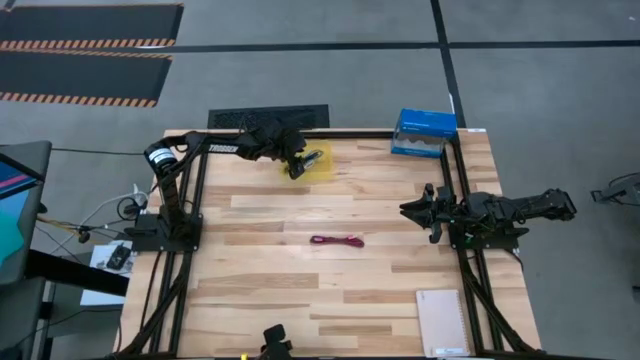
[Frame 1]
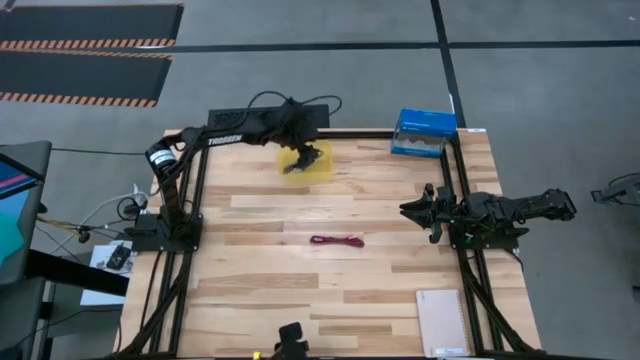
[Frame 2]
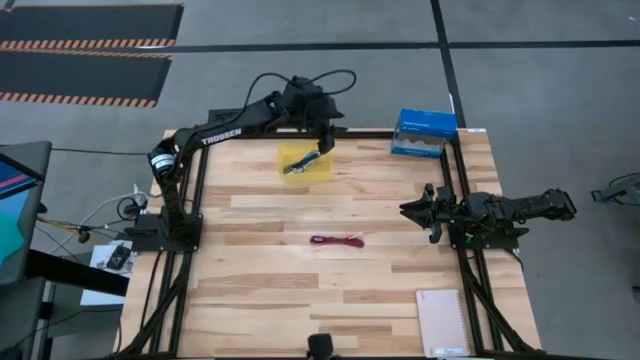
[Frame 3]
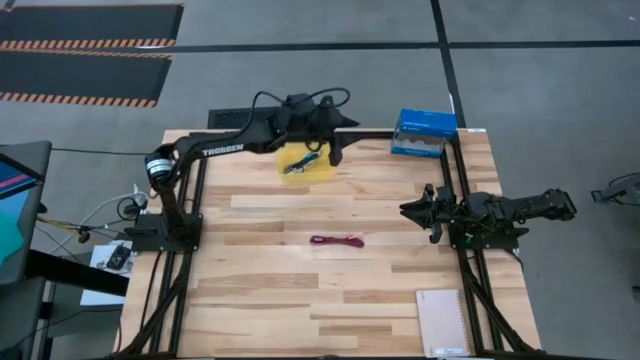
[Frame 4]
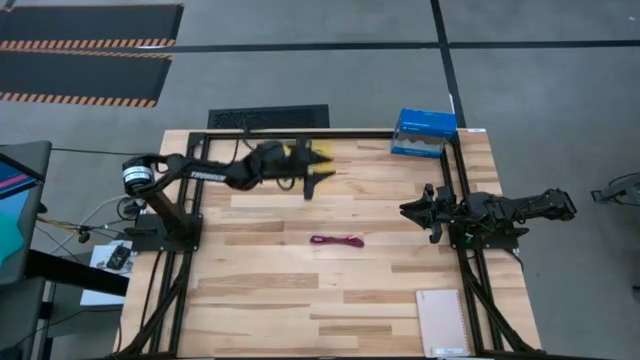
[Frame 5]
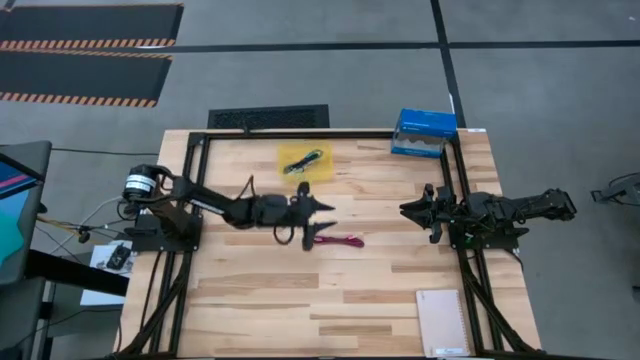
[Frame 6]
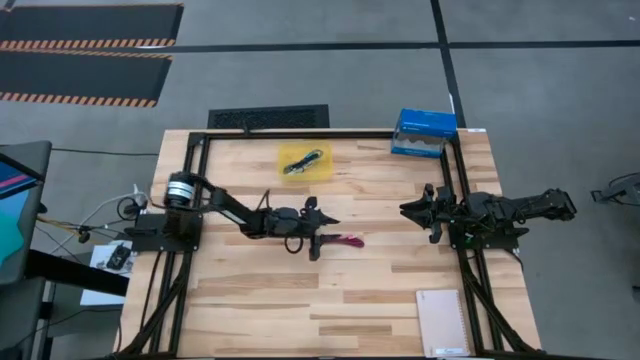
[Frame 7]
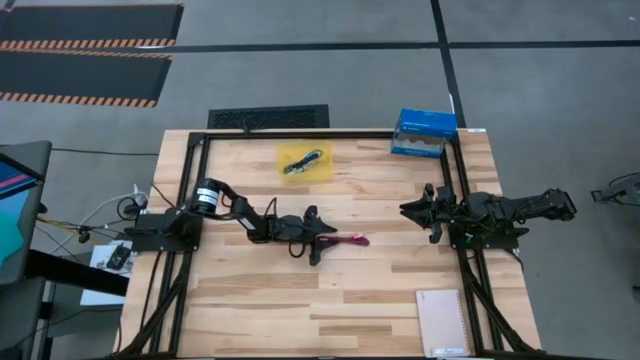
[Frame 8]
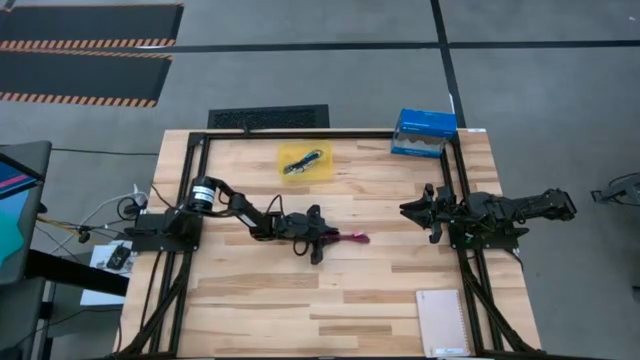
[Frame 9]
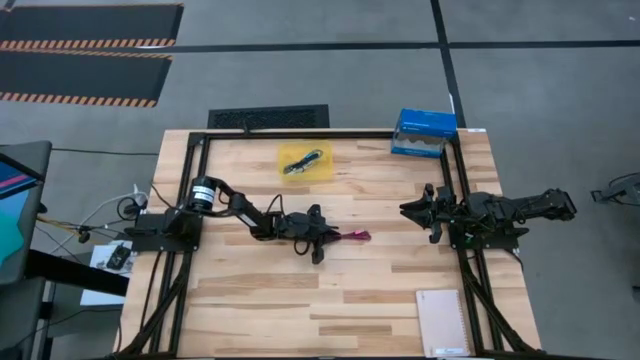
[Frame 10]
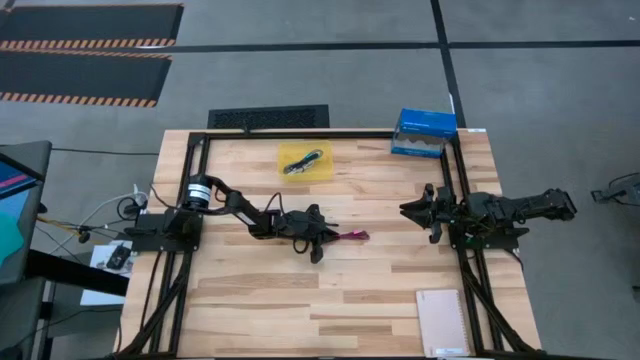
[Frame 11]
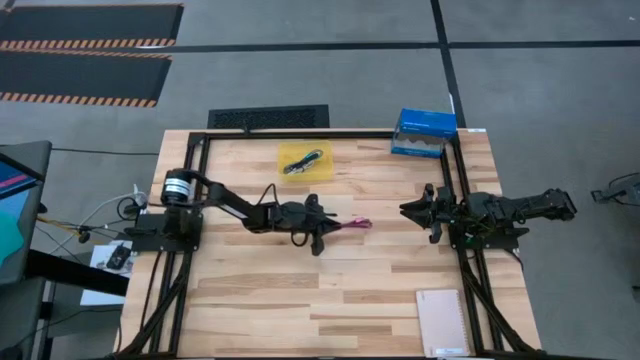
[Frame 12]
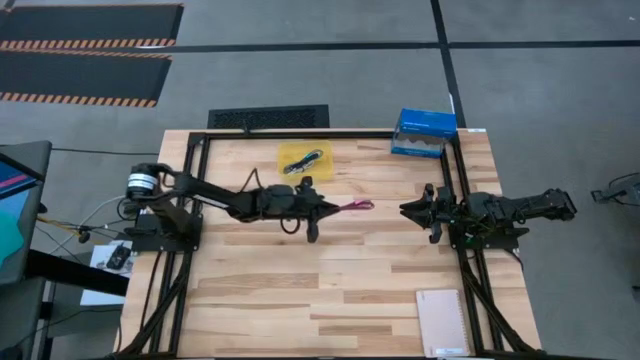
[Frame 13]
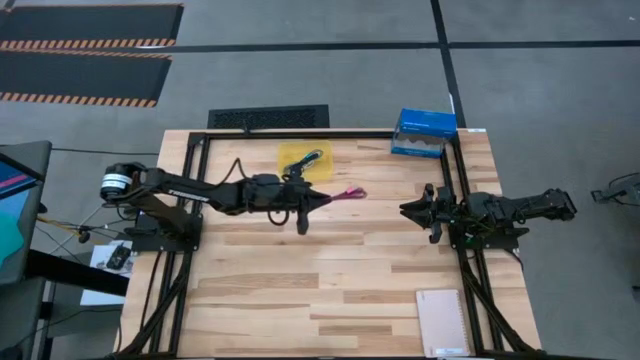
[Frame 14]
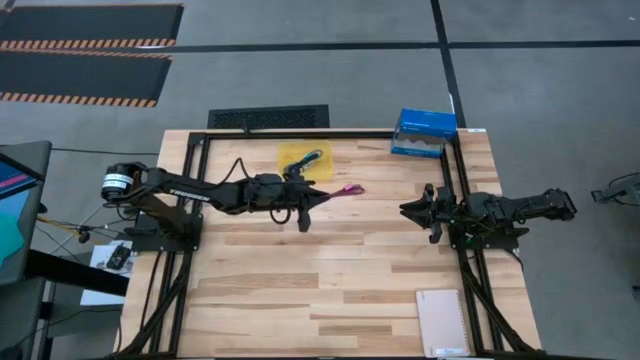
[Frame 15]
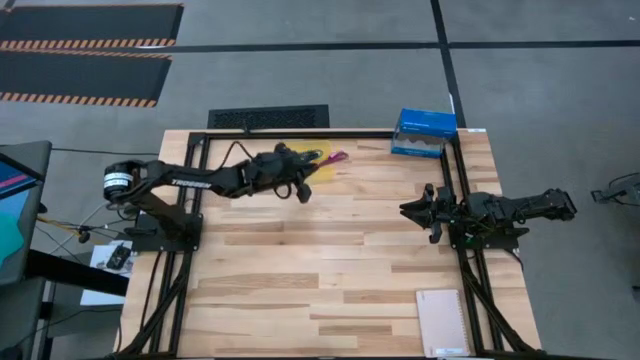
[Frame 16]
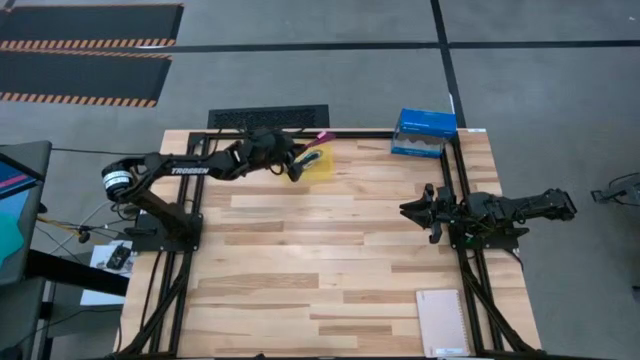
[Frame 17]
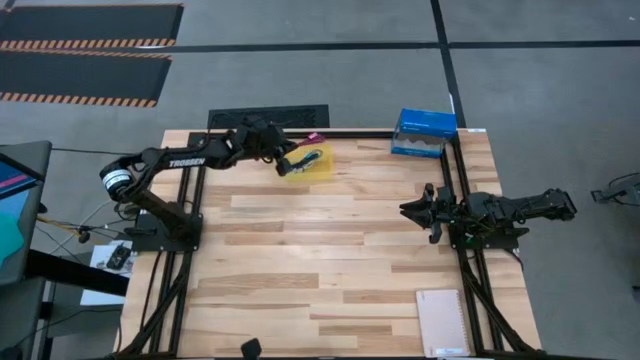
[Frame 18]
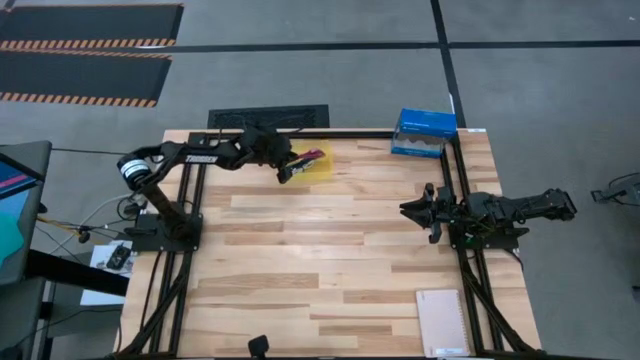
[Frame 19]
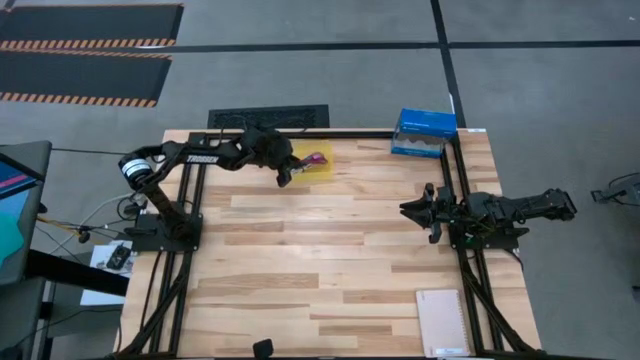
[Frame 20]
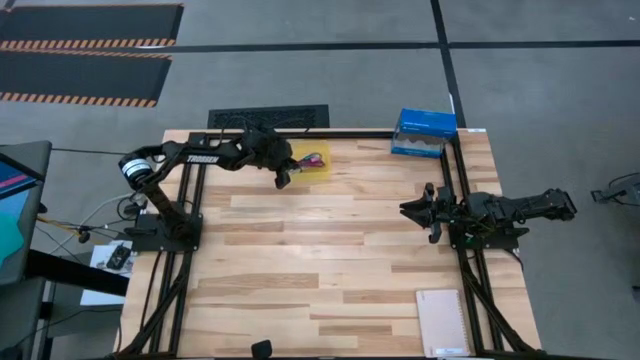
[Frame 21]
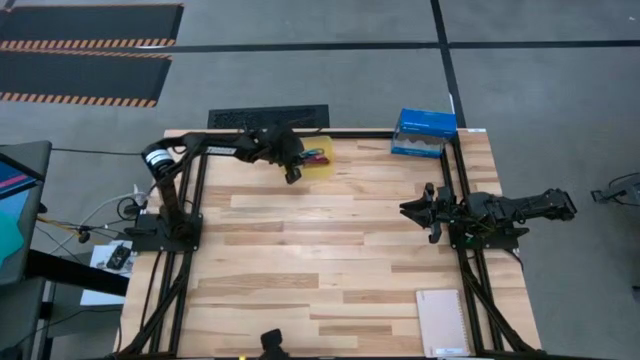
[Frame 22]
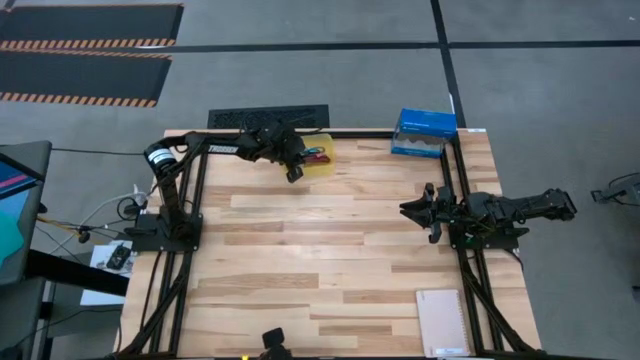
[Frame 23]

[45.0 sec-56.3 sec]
Task: Pick and place USB-C Cables
Put the pink charger cable into the yellow bin

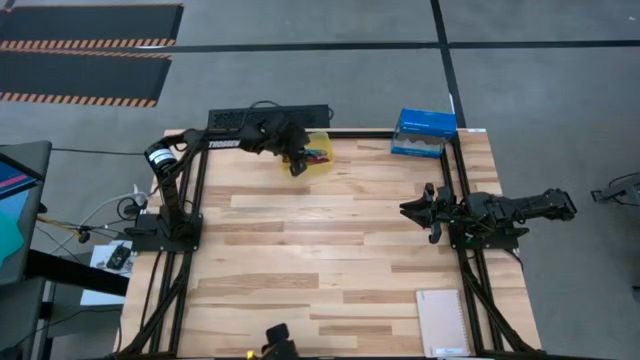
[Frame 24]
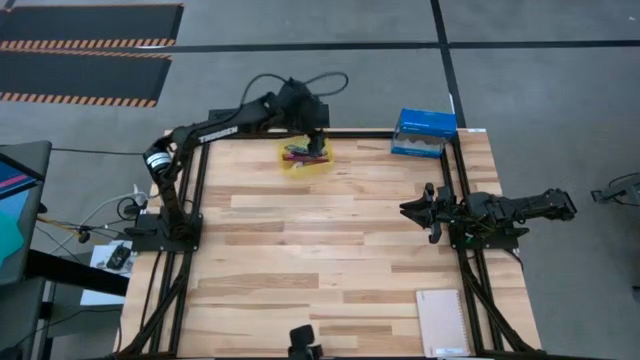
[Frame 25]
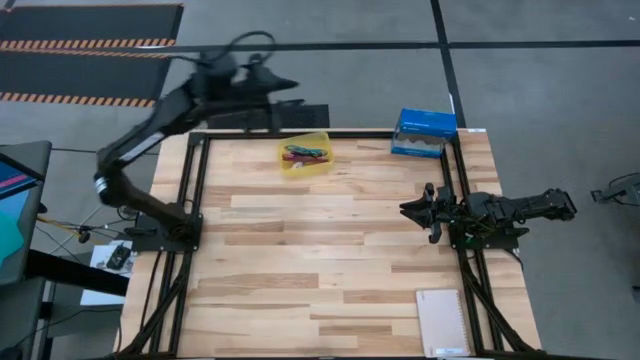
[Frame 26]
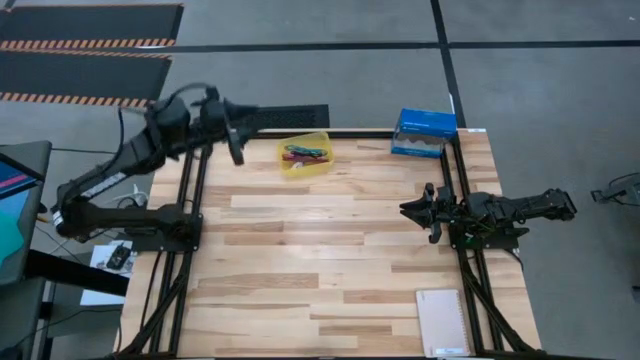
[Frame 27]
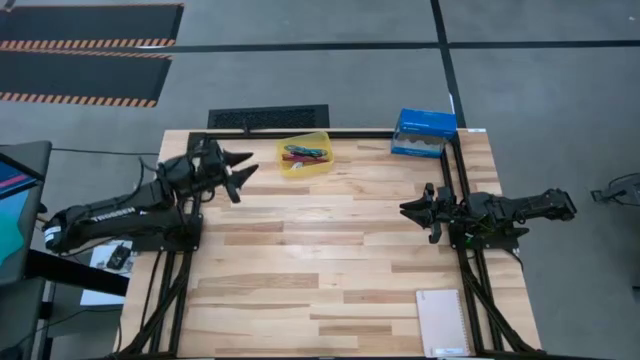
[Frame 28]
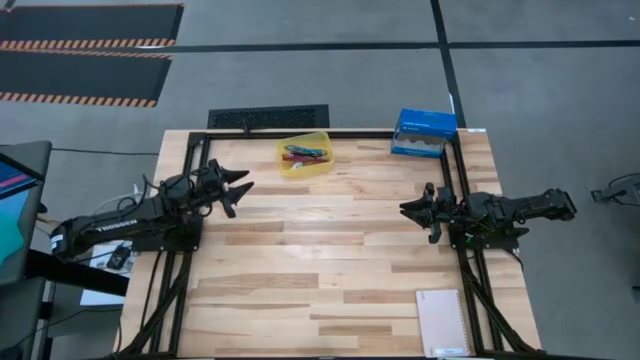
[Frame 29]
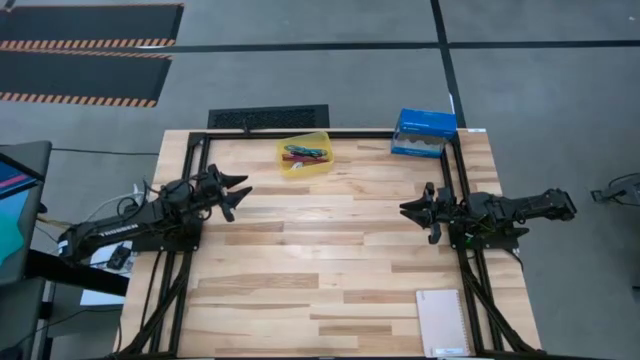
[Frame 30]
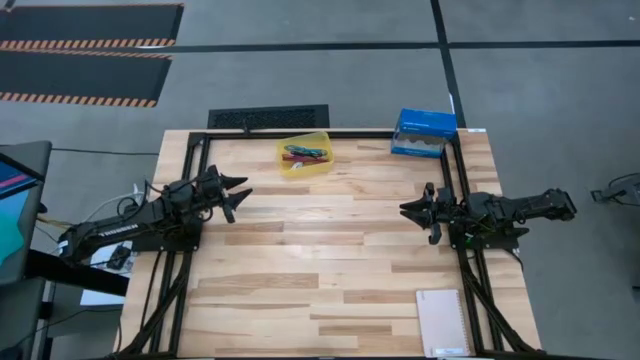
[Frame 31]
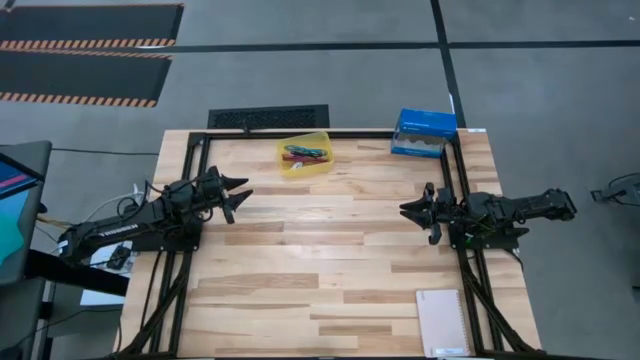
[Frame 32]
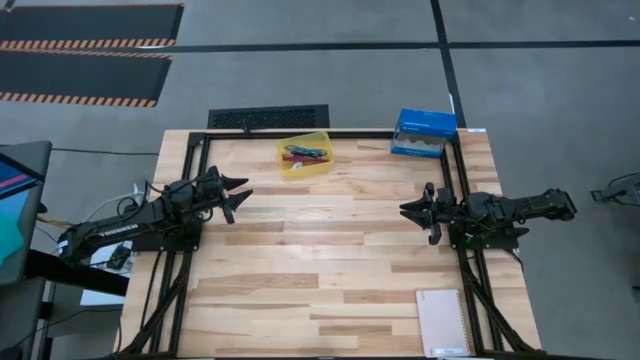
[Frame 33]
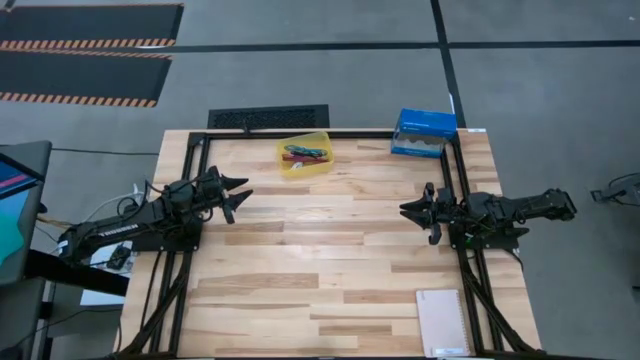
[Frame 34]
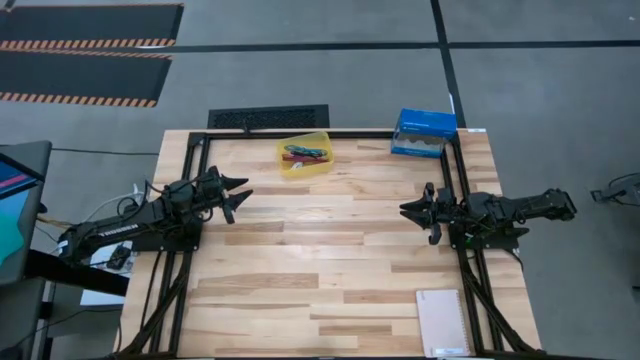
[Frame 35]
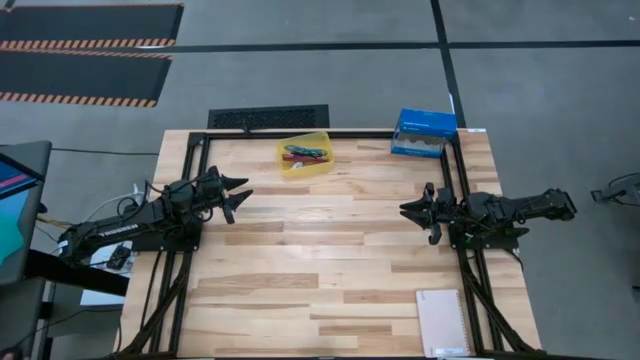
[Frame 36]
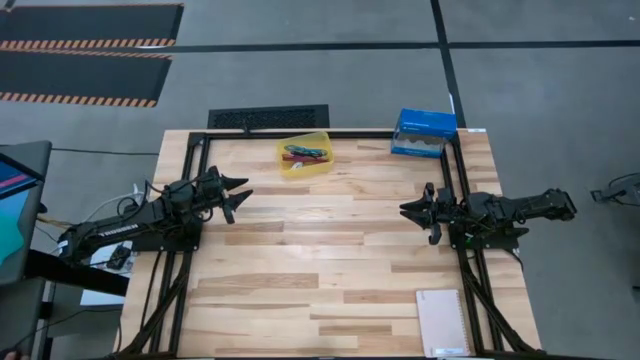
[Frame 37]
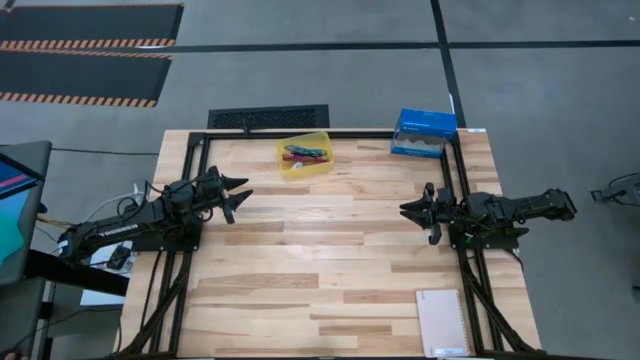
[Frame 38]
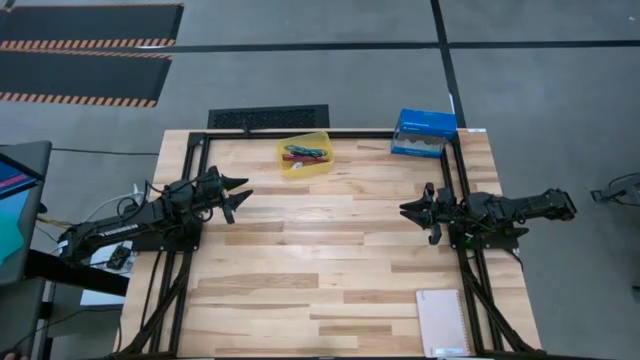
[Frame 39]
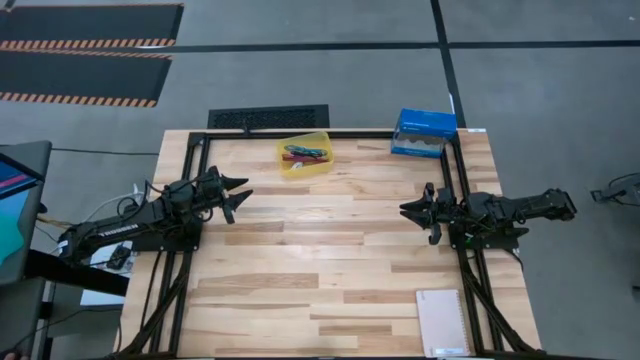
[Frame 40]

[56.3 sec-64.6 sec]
Return to Home Position

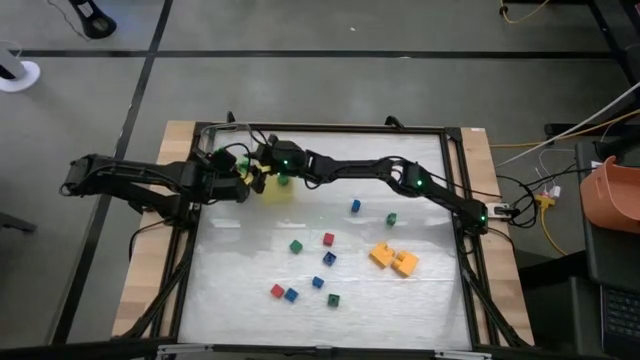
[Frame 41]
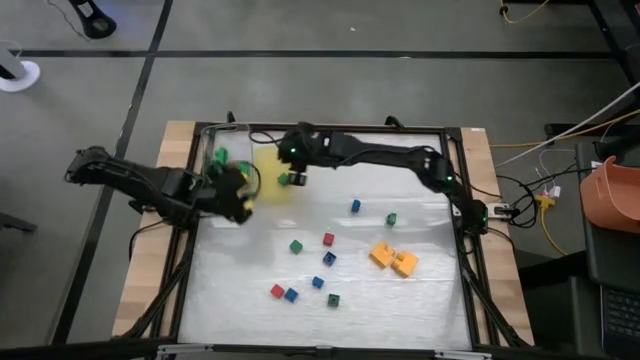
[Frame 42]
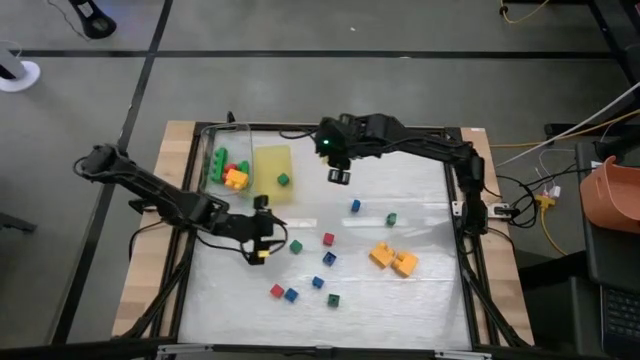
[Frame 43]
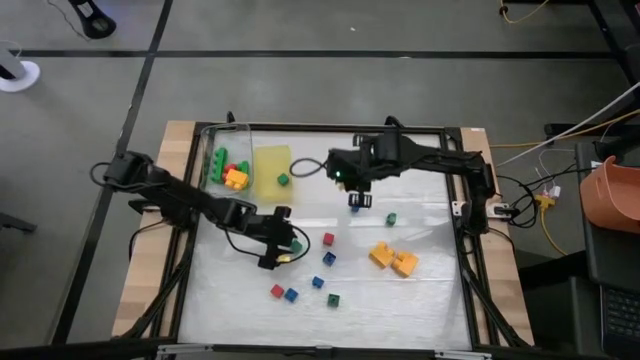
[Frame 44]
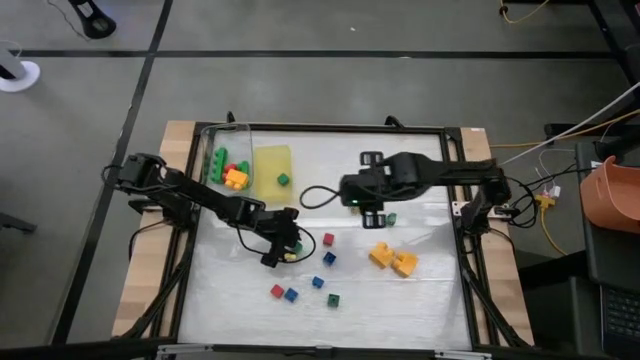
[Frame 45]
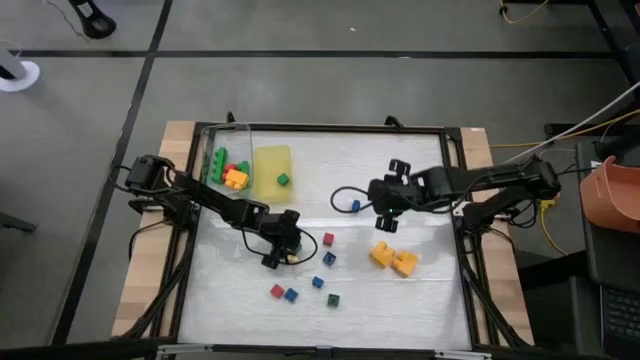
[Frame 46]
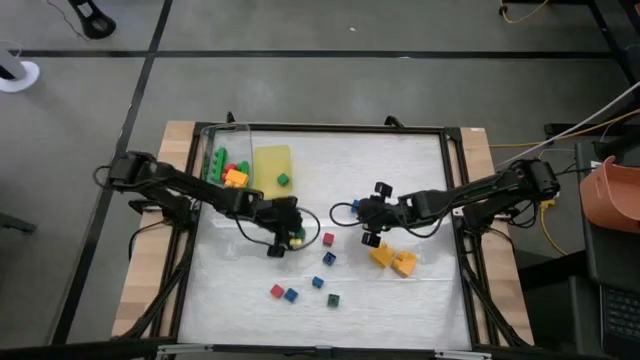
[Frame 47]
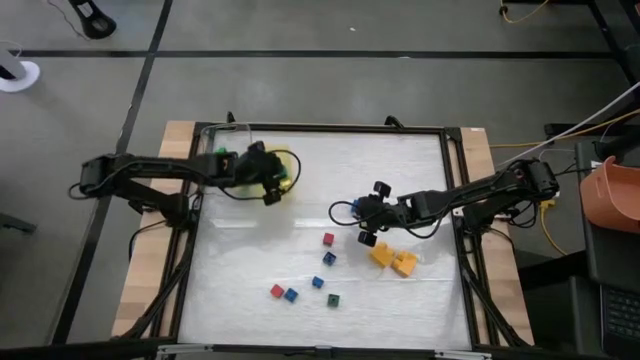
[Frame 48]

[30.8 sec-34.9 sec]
Task: Sort blocks by size
Put the small green game piece into the yellow bin
